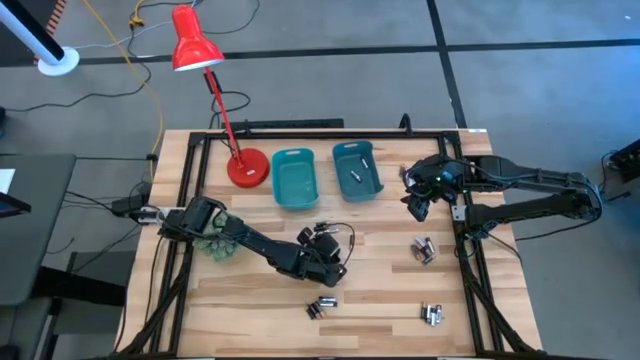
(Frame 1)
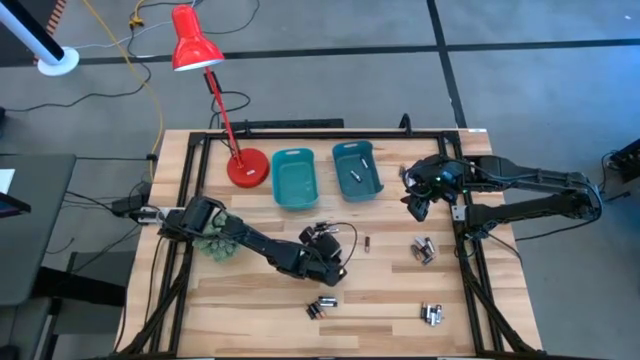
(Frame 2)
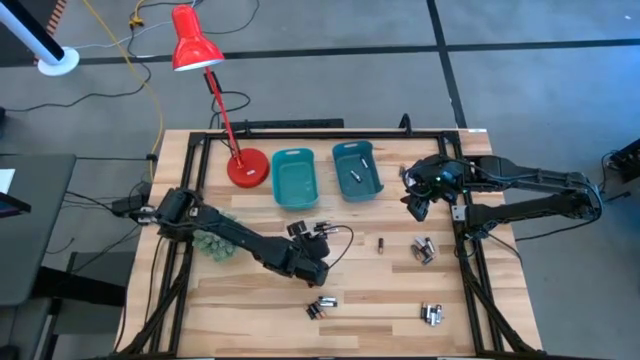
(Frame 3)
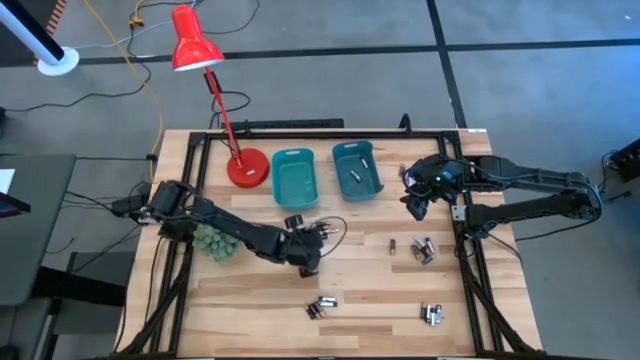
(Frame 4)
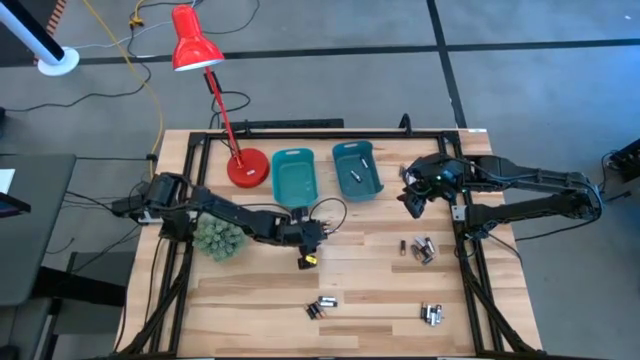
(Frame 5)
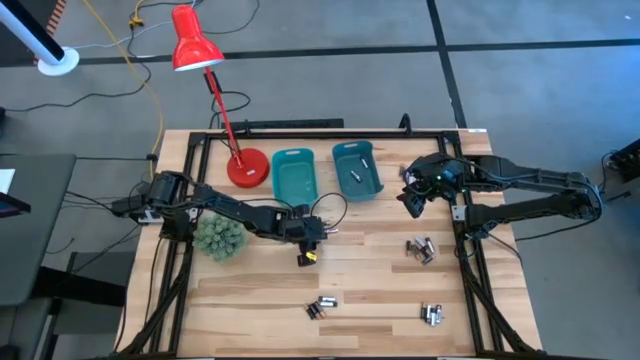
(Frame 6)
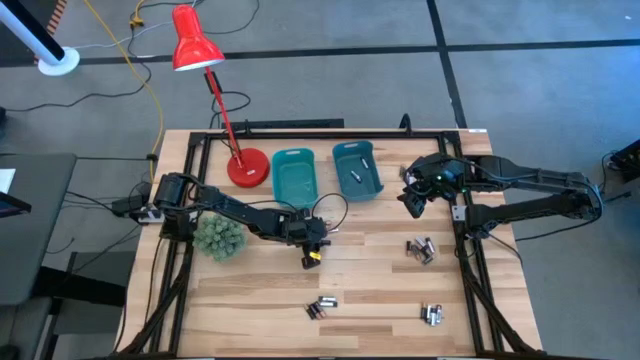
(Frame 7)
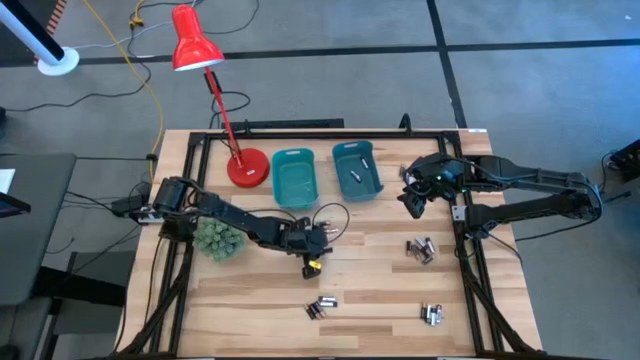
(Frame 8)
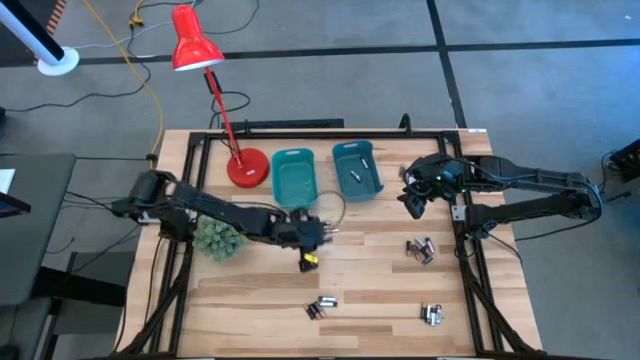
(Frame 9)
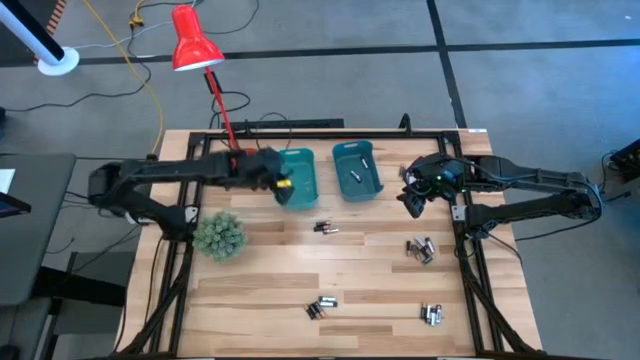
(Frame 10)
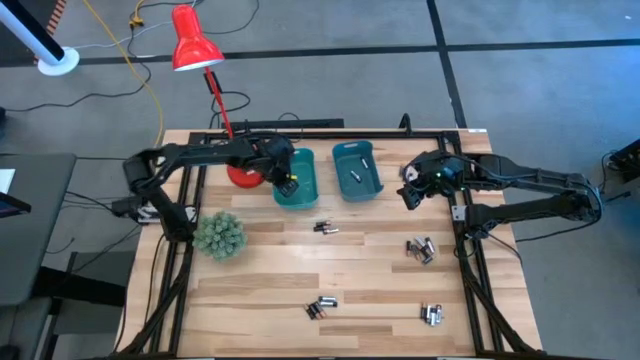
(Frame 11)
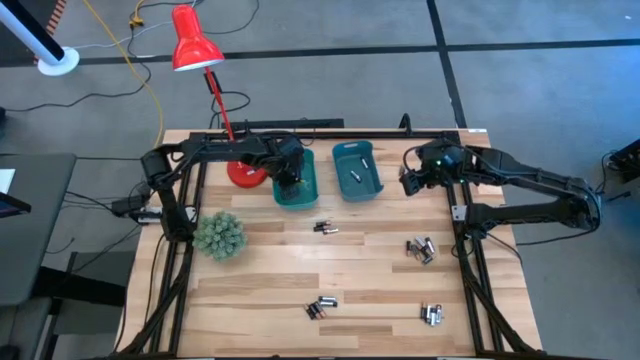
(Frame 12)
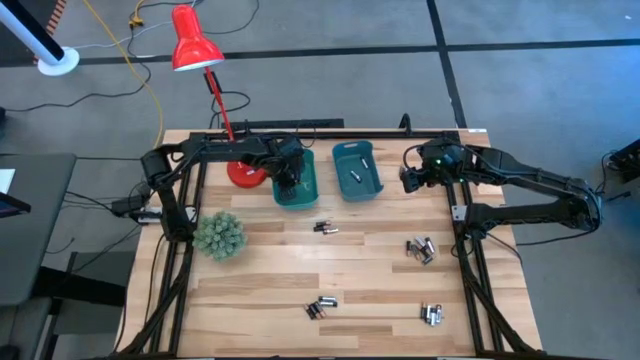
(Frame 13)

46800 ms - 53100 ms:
Task: Sort batteries
Put the black battery into the green bin

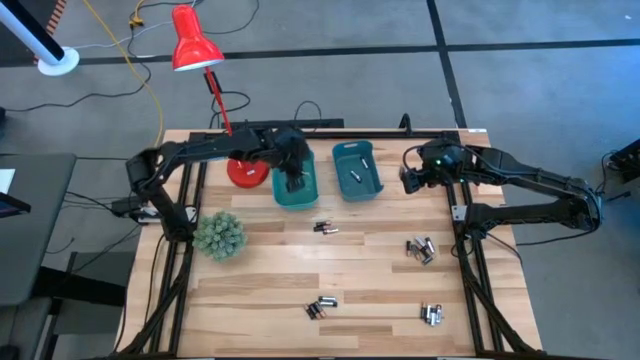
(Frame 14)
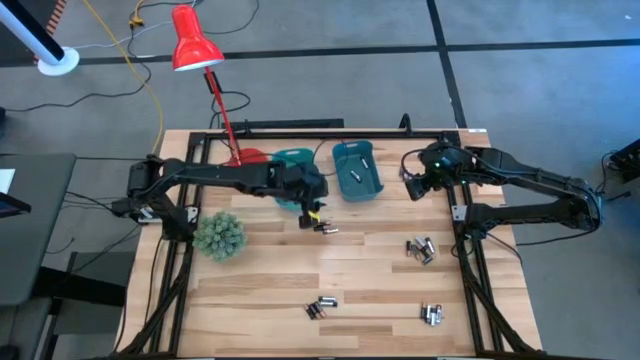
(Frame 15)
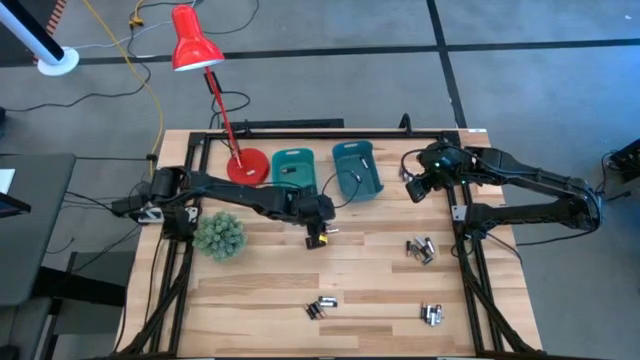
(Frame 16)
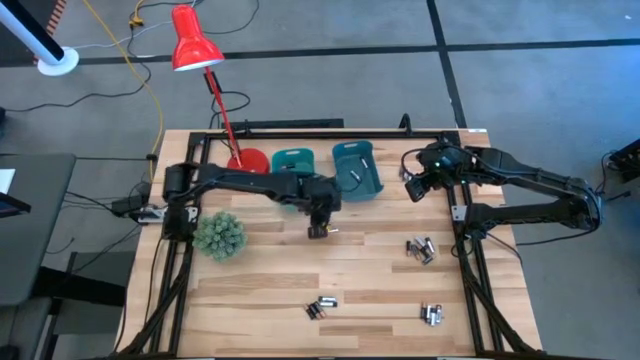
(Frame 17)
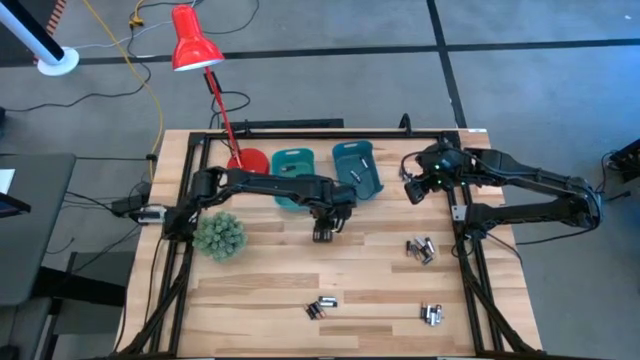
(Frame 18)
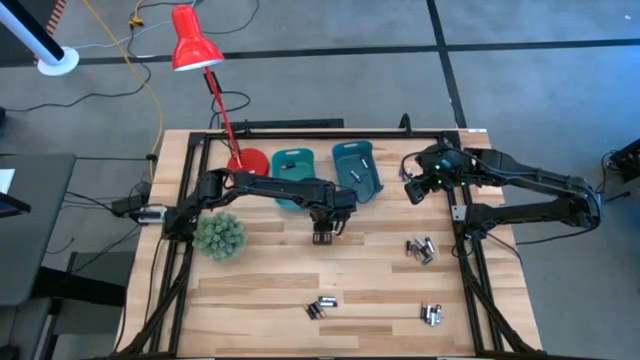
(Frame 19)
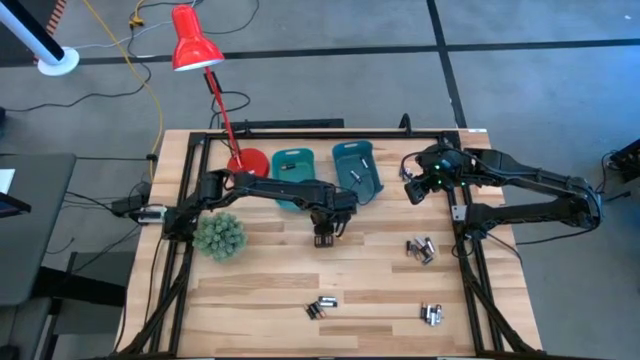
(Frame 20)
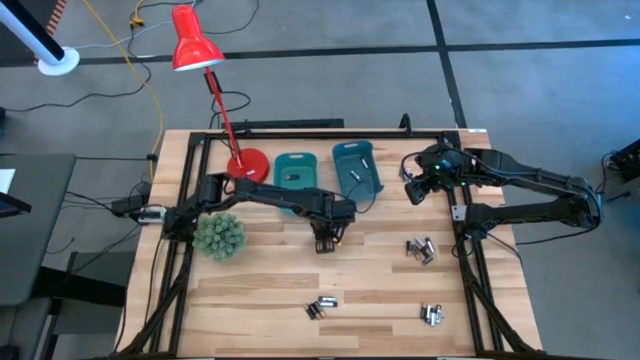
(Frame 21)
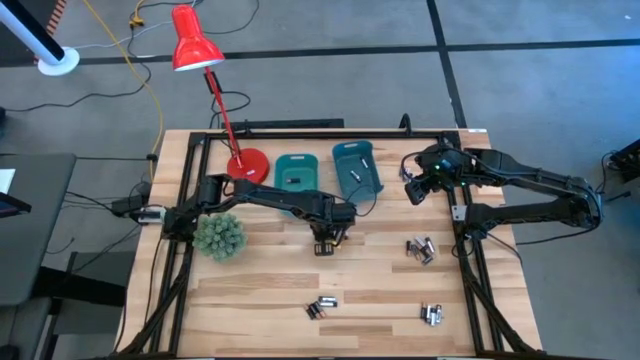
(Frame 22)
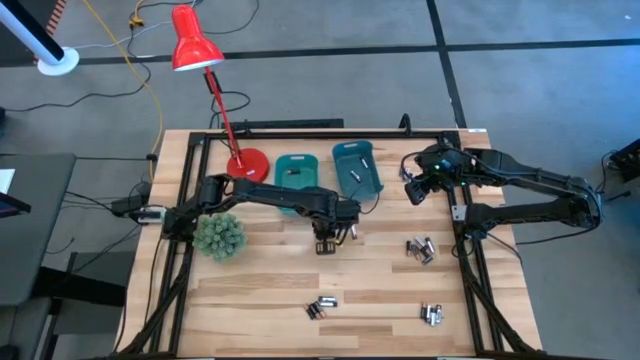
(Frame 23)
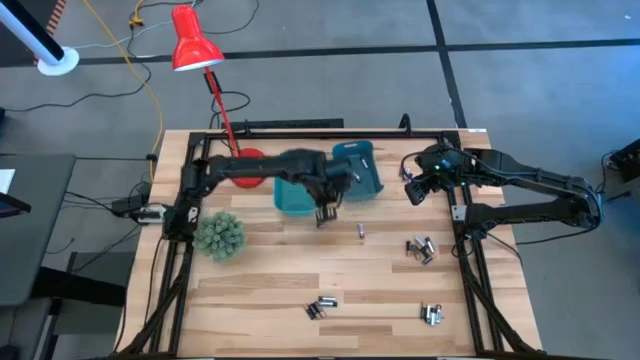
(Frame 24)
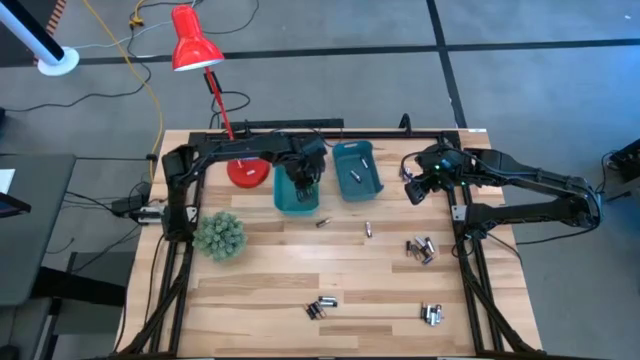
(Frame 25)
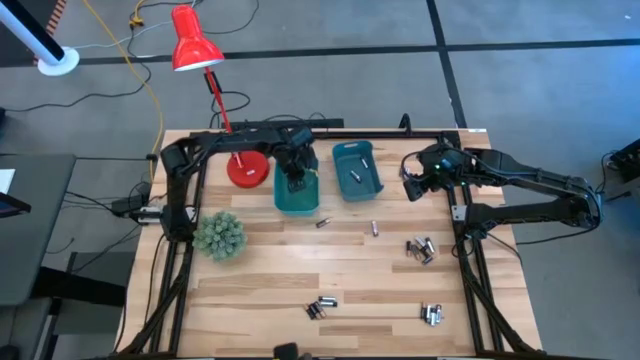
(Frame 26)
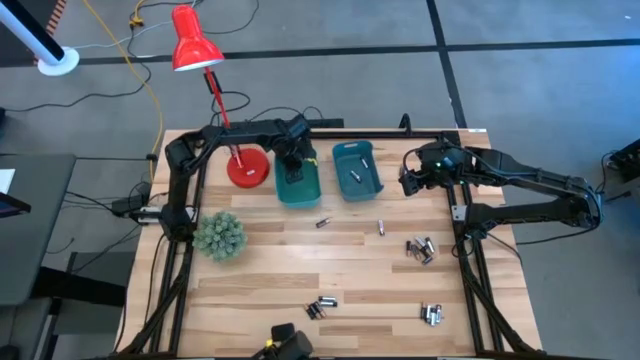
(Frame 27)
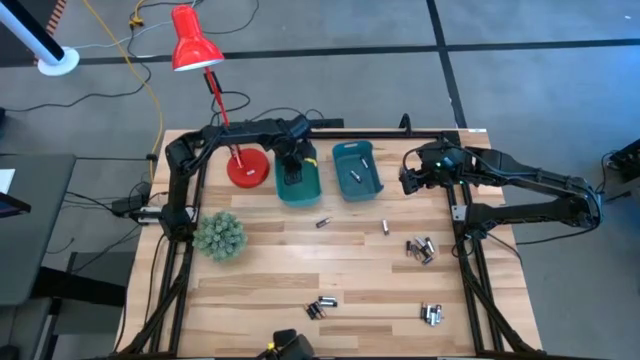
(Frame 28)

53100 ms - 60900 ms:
Put the black battery into the green bin

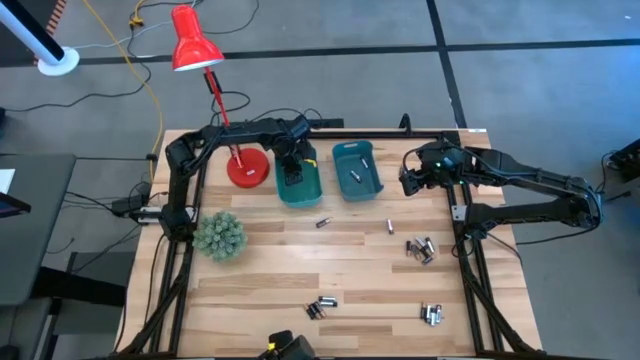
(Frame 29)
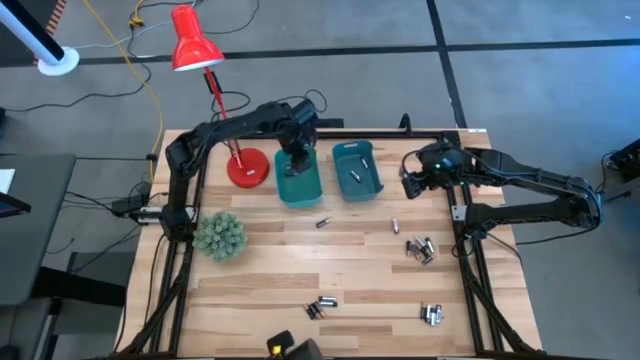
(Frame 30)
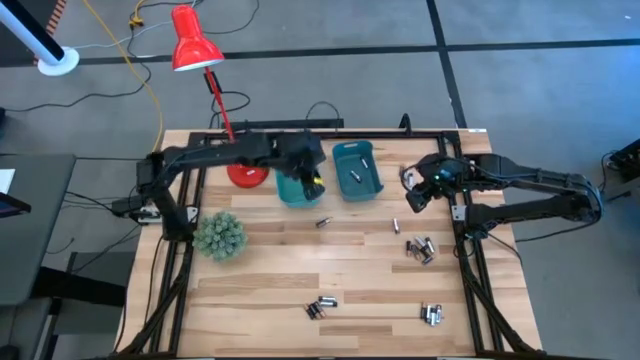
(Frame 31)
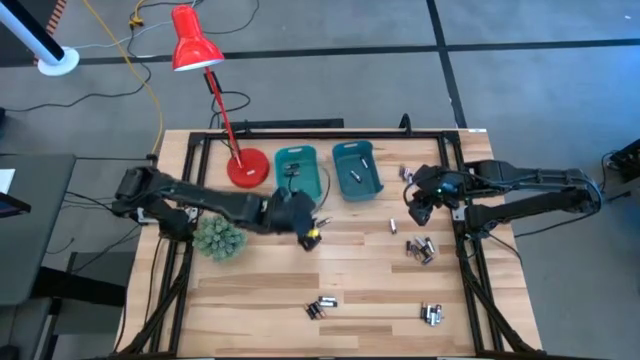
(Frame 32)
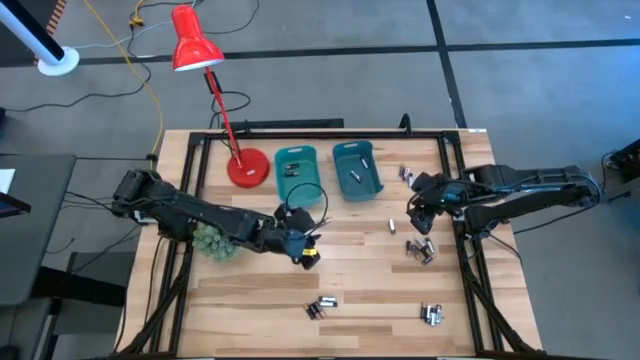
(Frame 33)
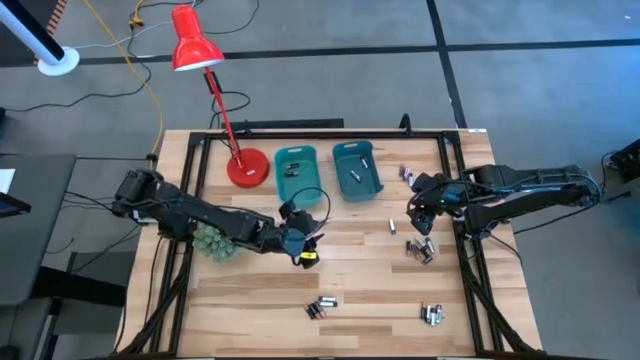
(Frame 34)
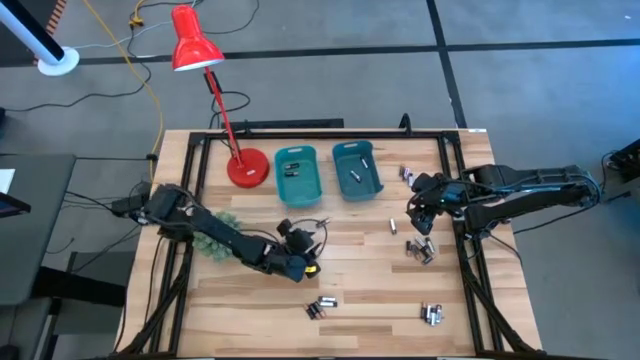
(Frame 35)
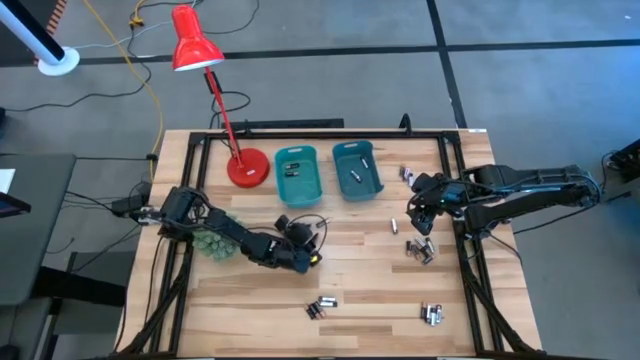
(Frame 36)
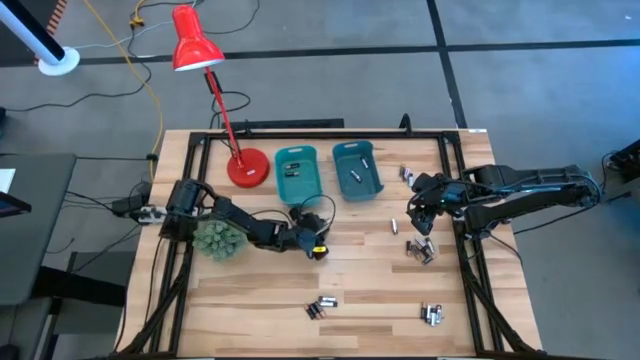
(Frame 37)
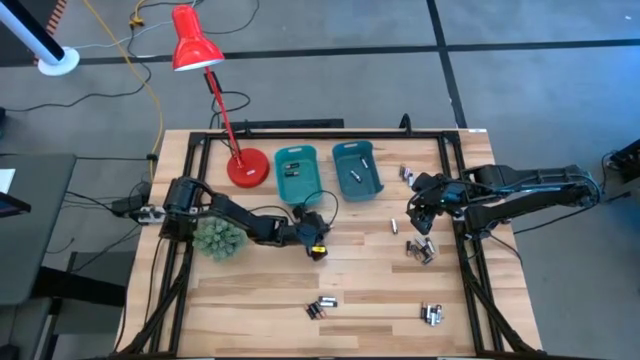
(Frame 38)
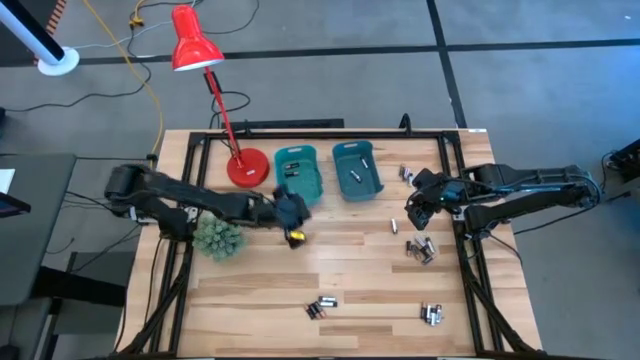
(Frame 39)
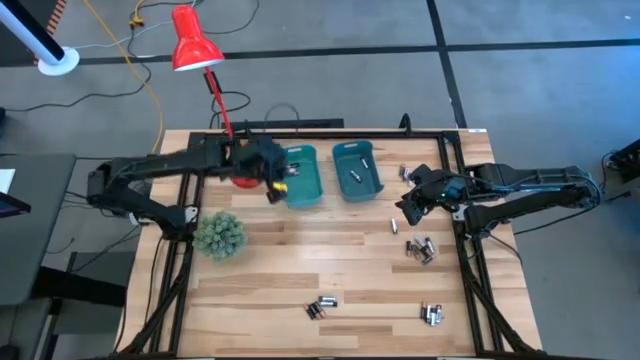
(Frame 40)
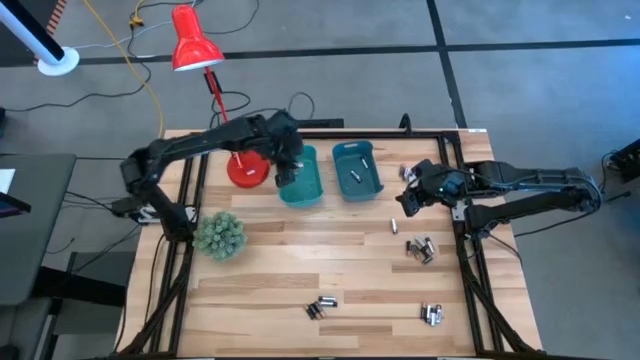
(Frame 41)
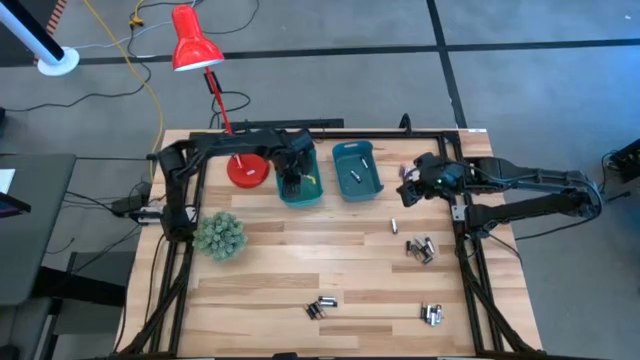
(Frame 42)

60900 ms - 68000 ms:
Put the black battery into the green bin

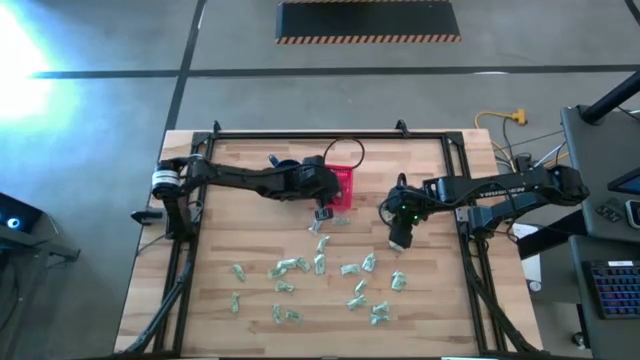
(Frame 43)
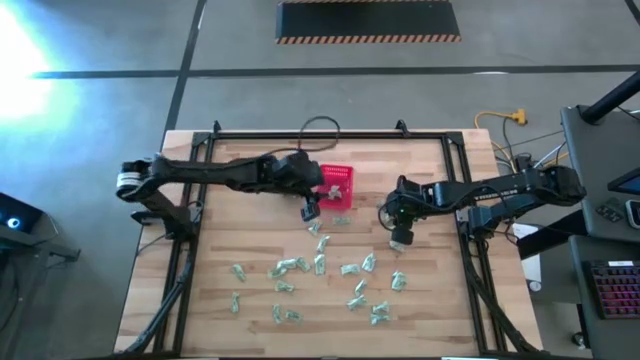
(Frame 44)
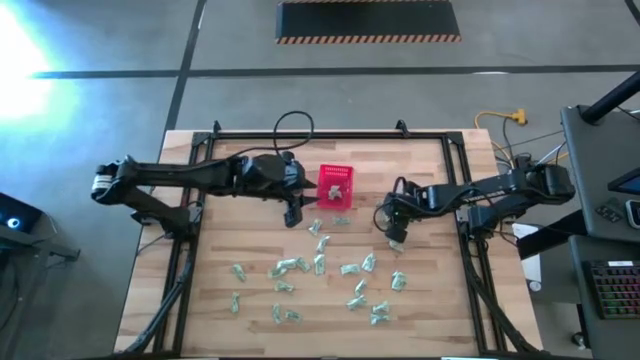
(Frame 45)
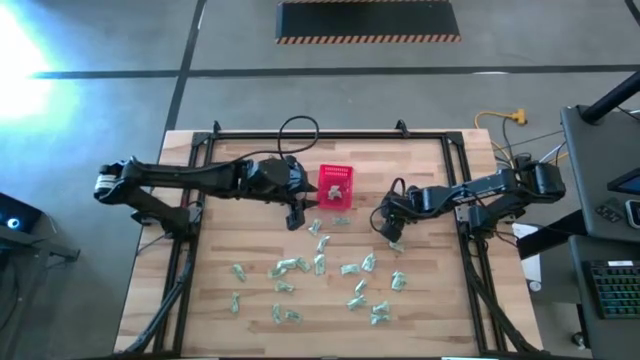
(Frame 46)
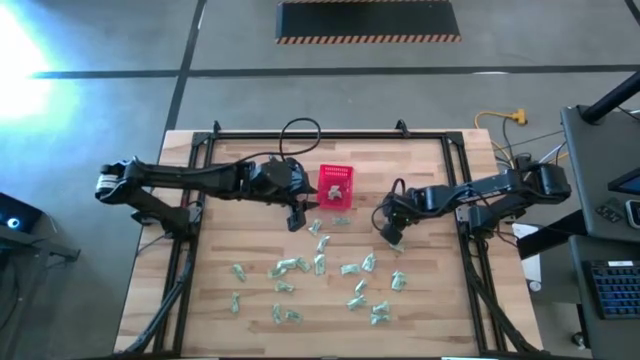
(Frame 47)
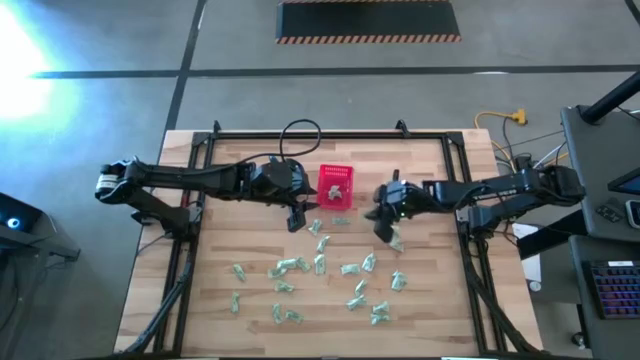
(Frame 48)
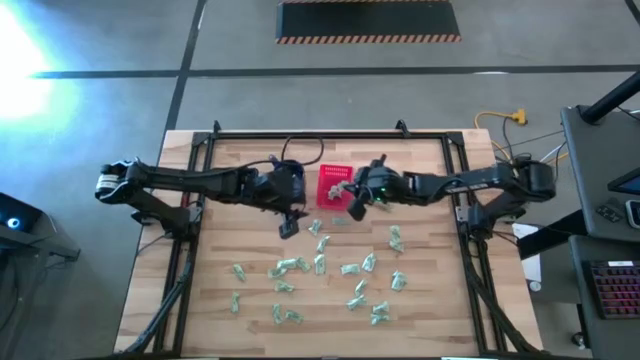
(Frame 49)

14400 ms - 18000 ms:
Task: Pick and place Stevia / Truvia into bins
Put the stevia packet into the basket
